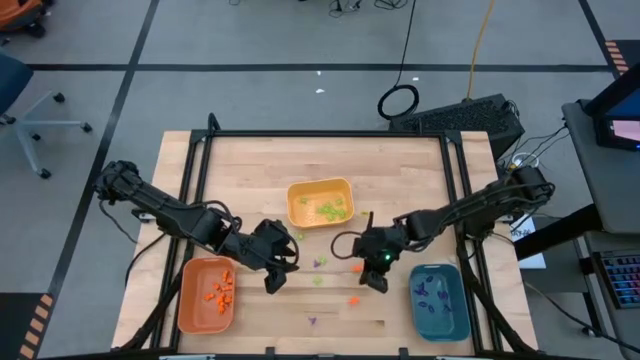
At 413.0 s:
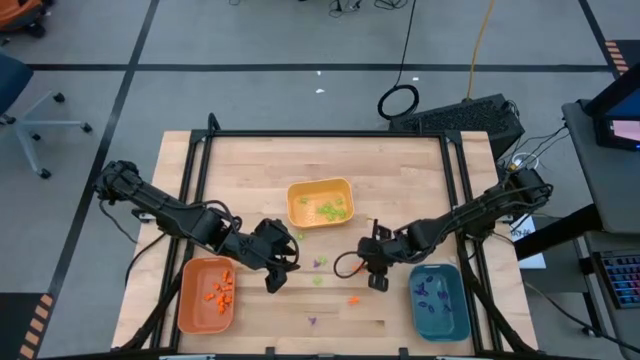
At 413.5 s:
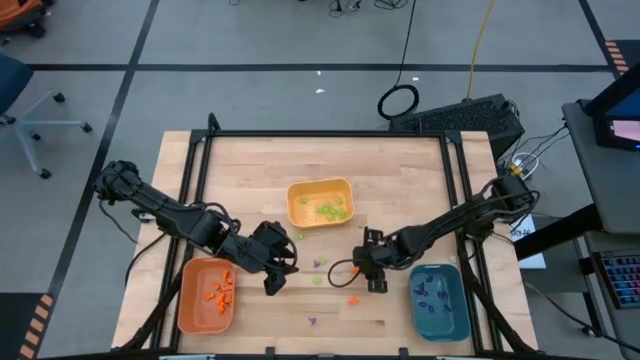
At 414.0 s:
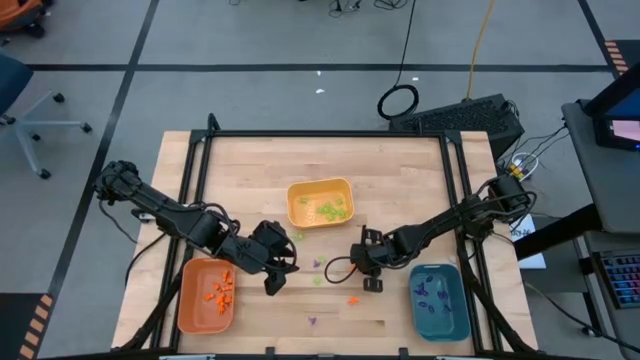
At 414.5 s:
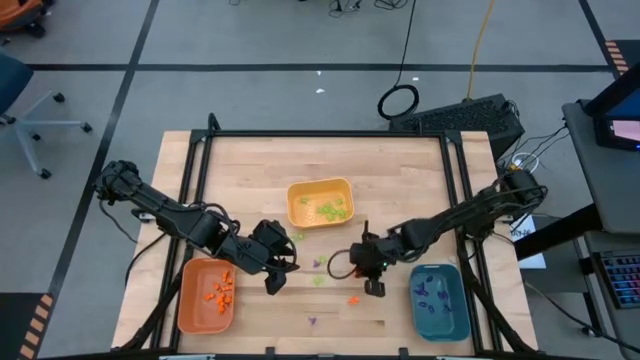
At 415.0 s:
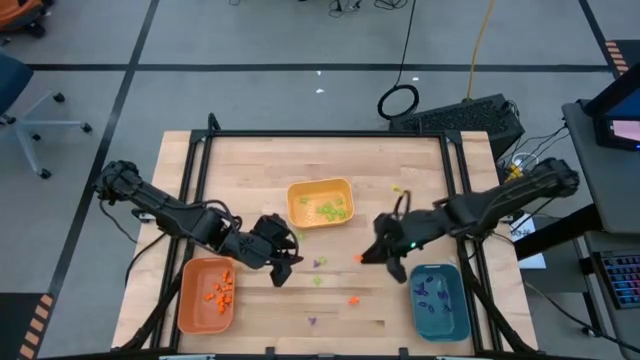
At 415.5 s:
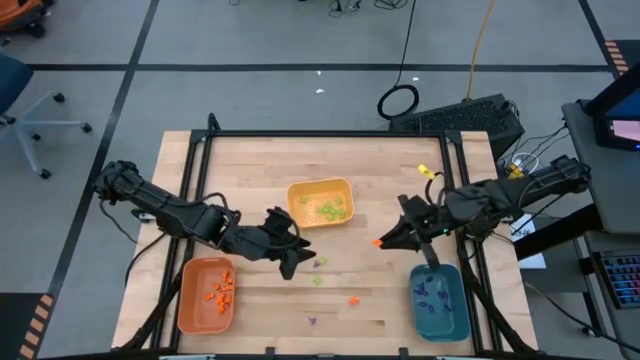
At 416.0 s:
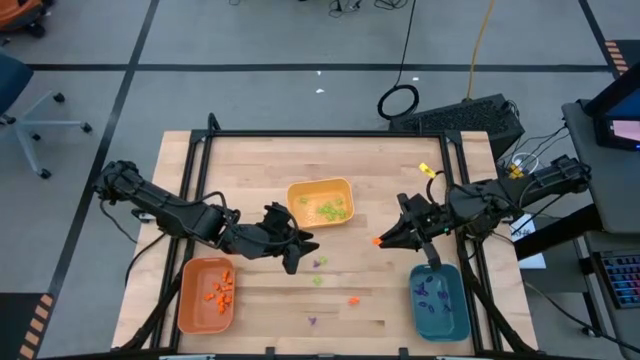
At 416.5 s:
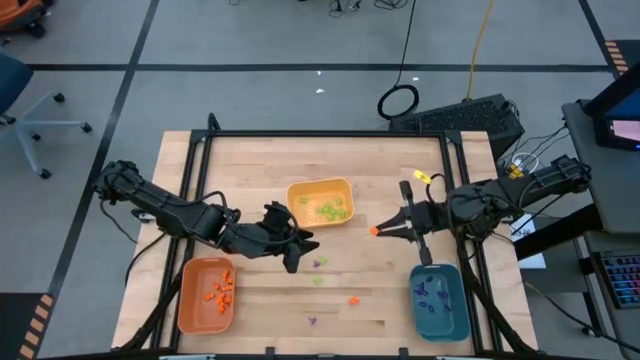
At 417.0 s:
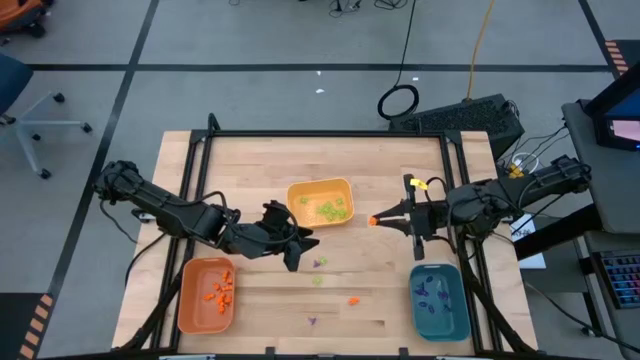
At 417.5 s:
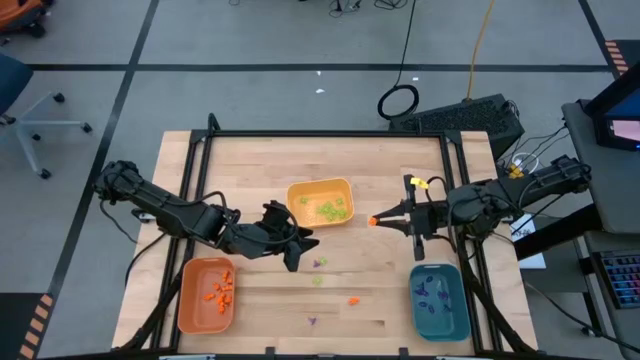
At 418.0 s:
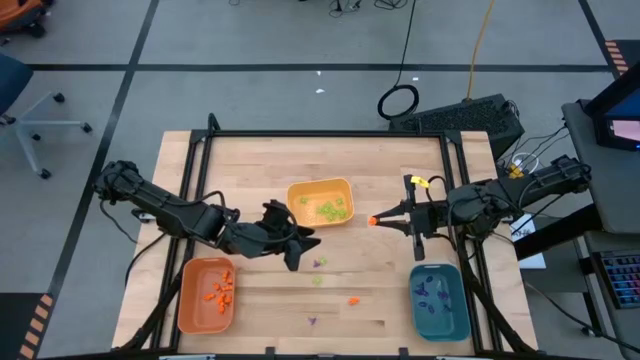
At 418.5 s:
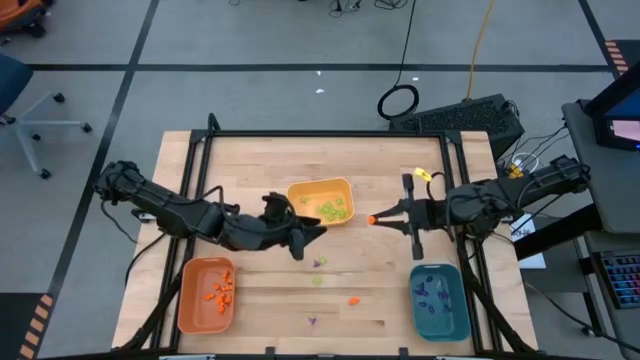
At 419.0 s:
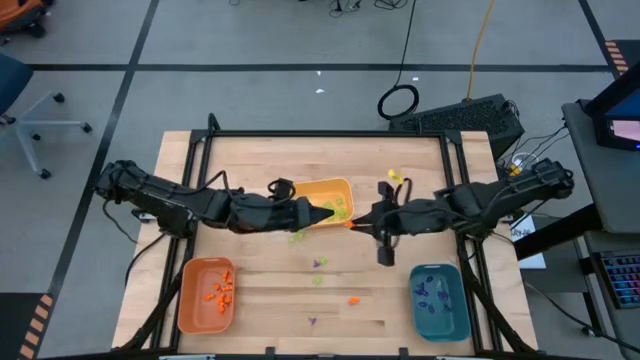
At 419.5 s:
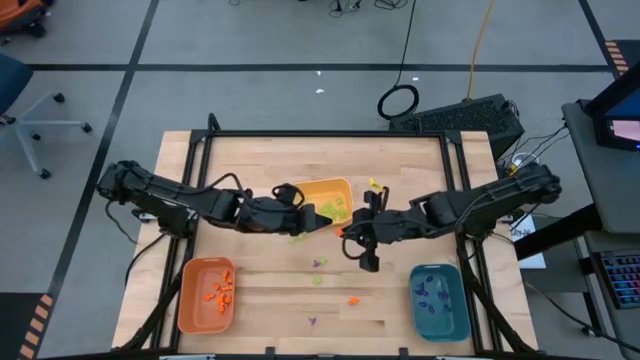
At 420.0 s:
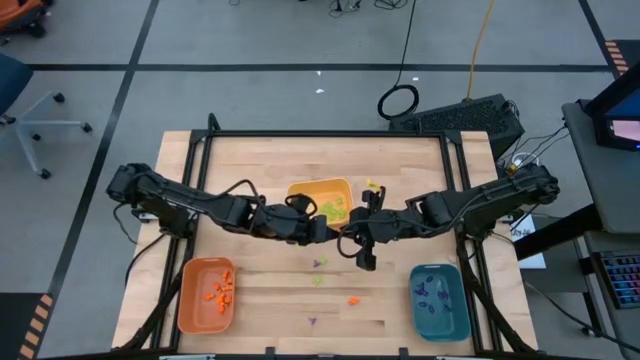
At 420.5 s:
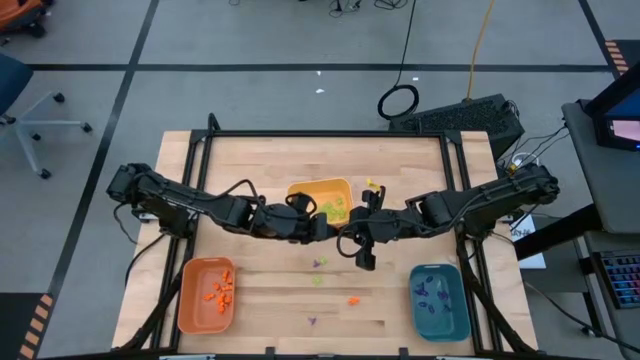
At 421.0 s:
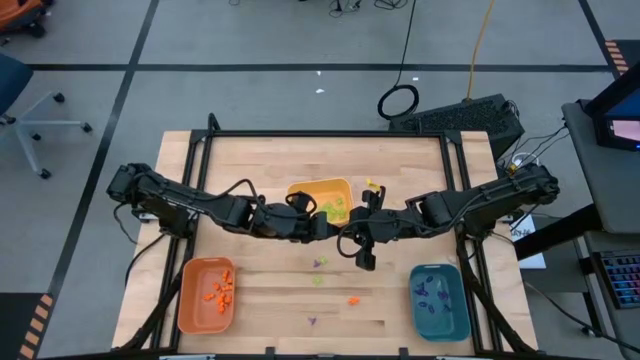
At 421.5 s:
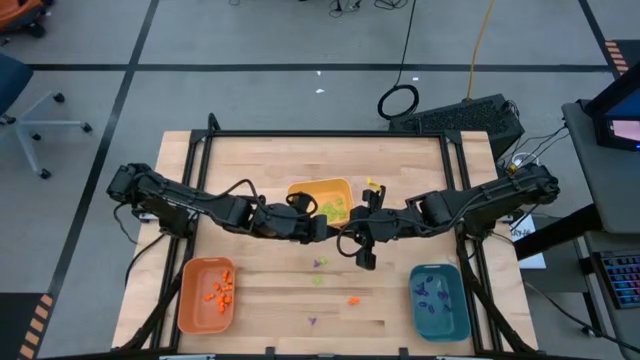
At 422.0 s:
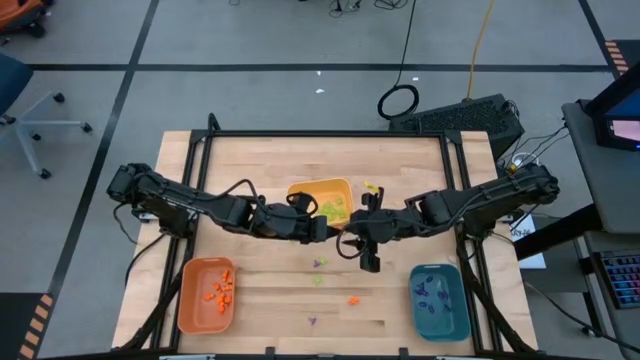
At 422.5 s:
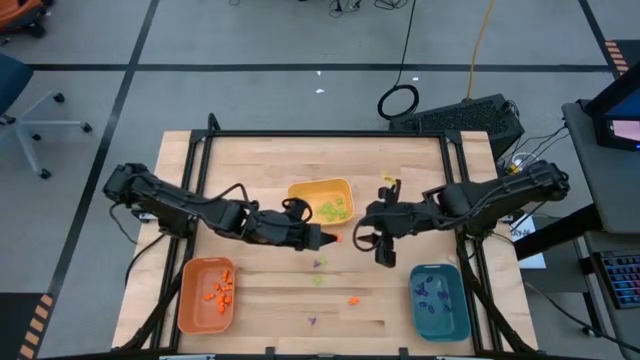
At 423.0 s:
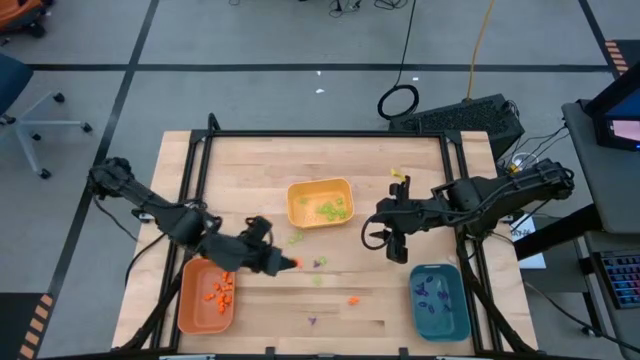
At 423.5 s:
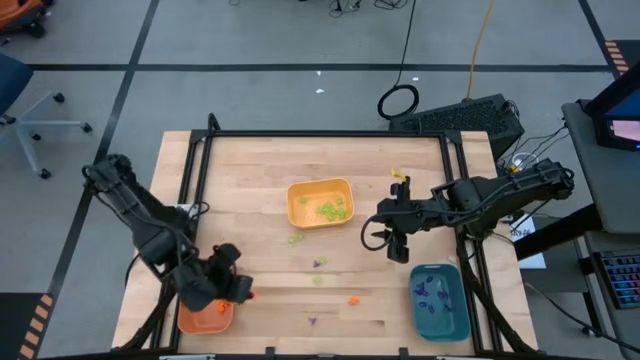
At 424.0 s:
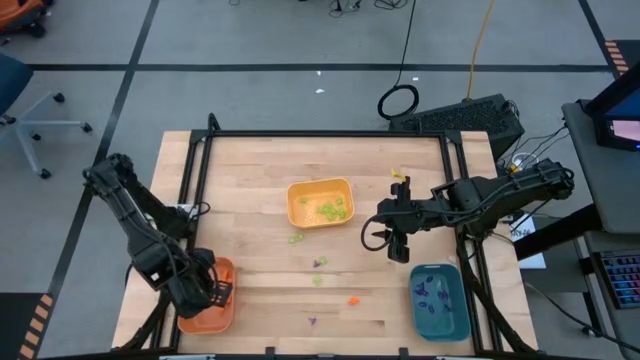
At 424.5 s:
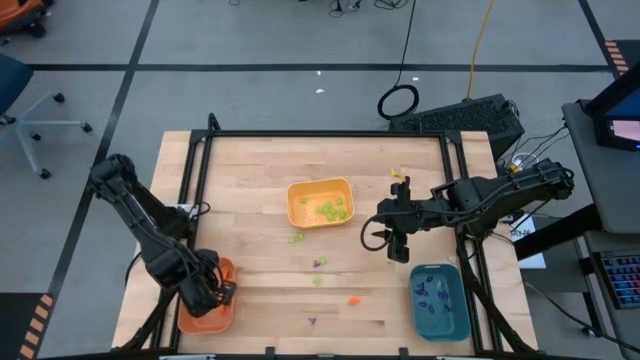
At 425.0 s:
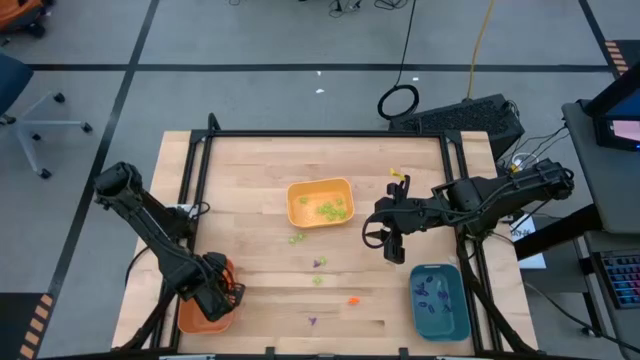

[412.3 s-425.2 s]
Task: Sort Halloween decoration
Put the orange skeleton toy into the orange bin

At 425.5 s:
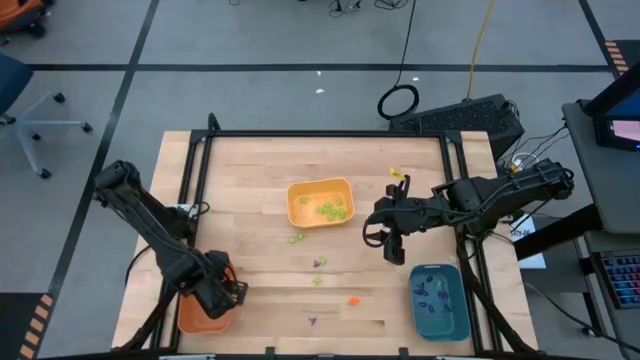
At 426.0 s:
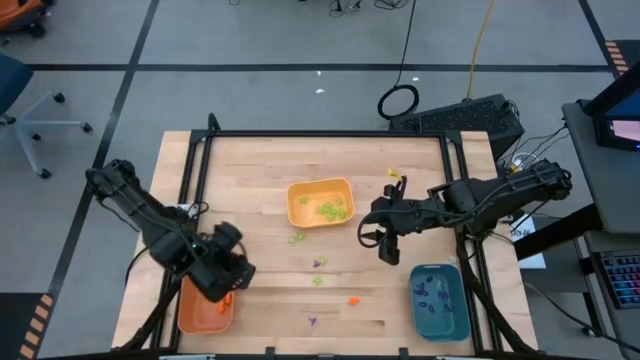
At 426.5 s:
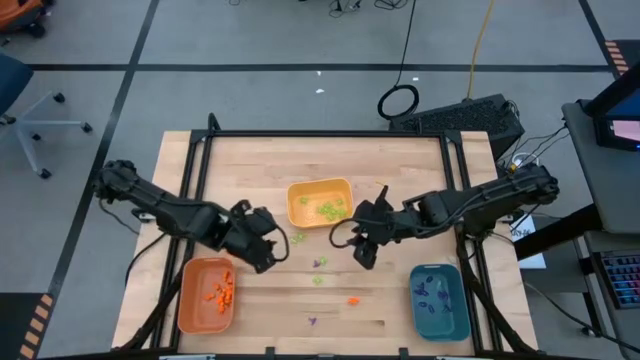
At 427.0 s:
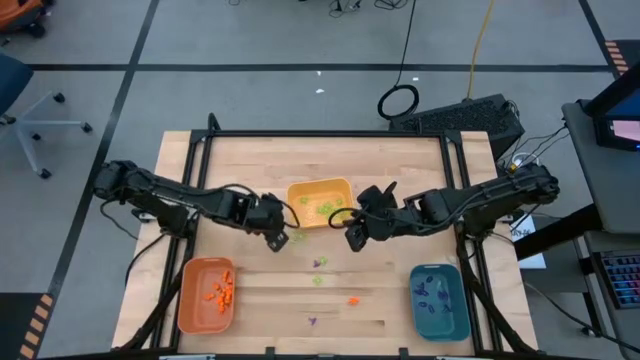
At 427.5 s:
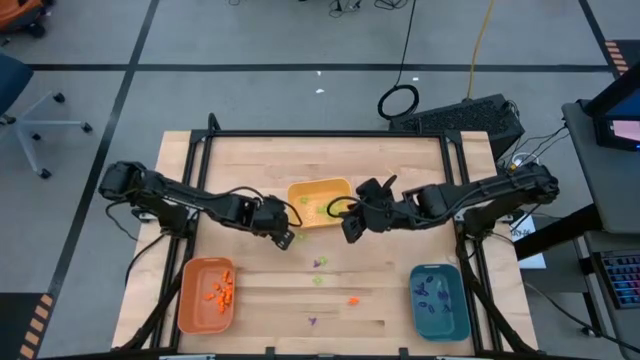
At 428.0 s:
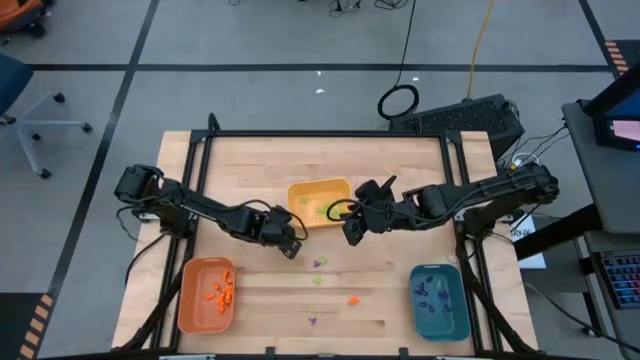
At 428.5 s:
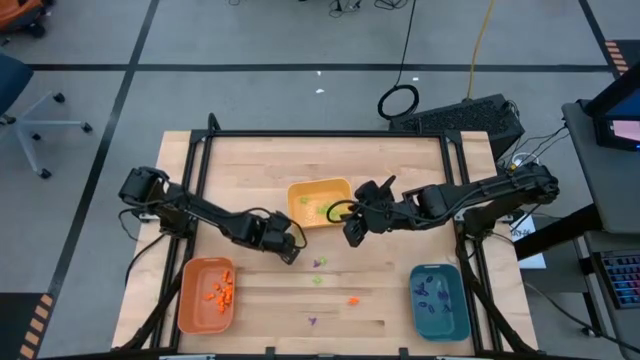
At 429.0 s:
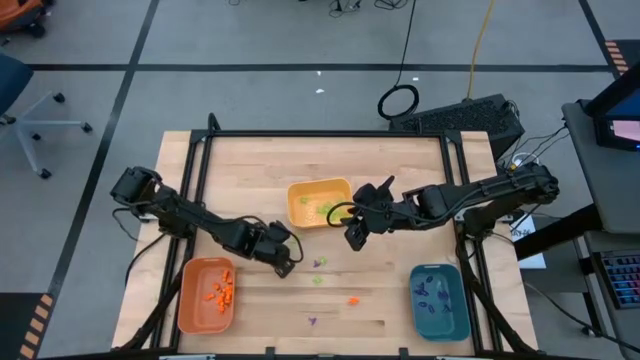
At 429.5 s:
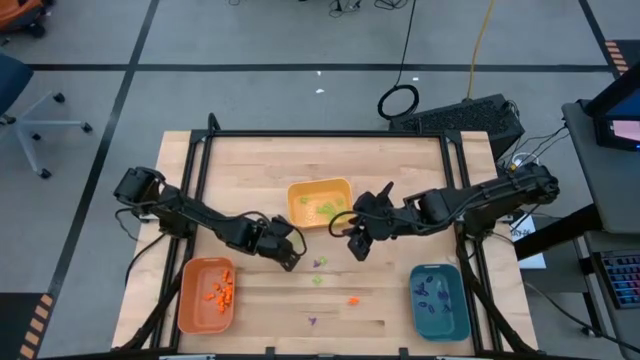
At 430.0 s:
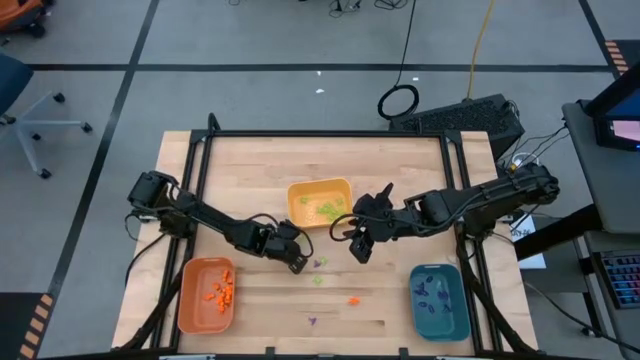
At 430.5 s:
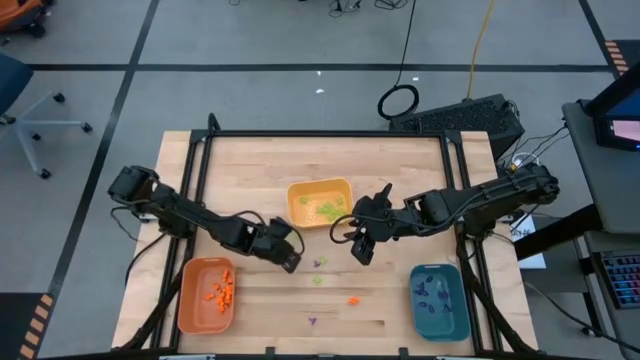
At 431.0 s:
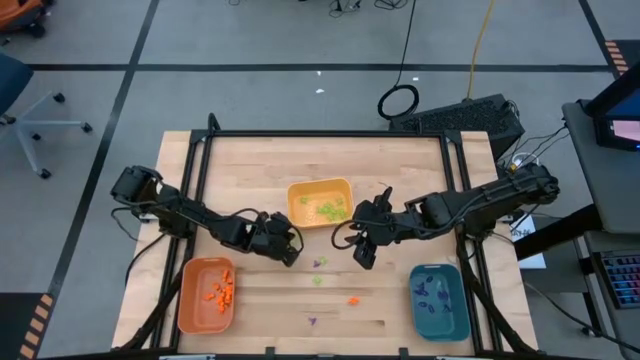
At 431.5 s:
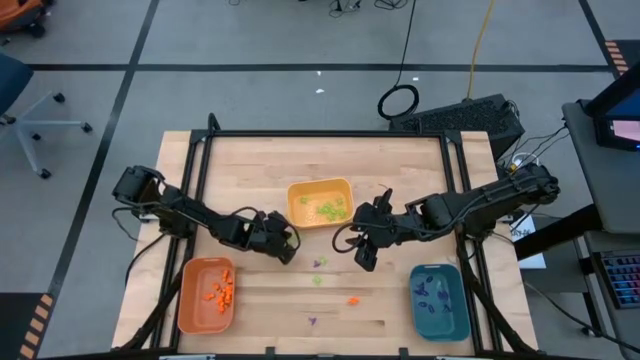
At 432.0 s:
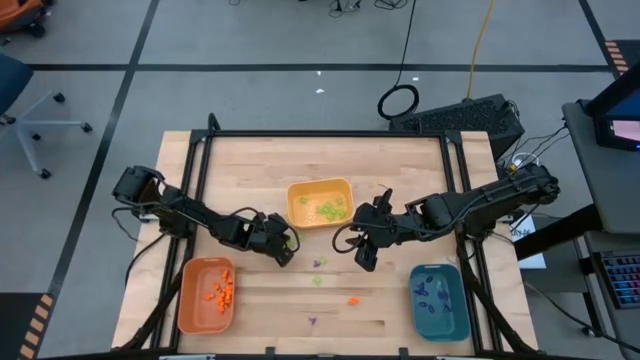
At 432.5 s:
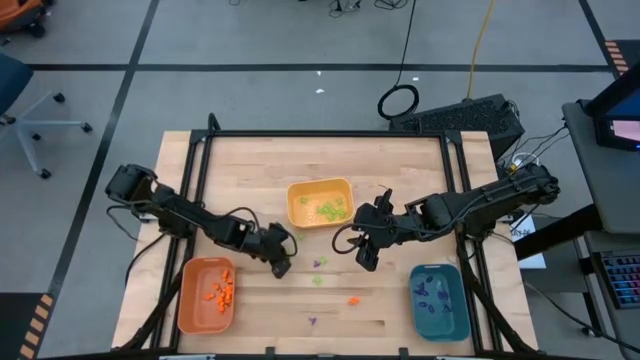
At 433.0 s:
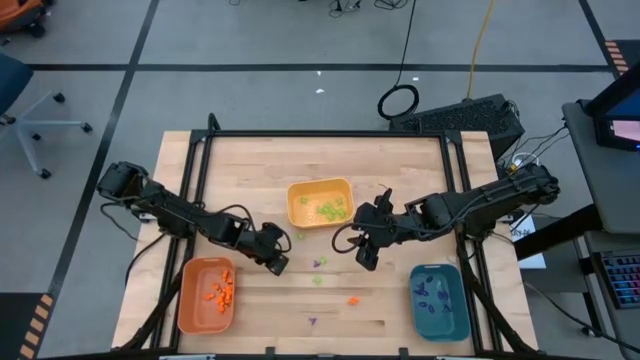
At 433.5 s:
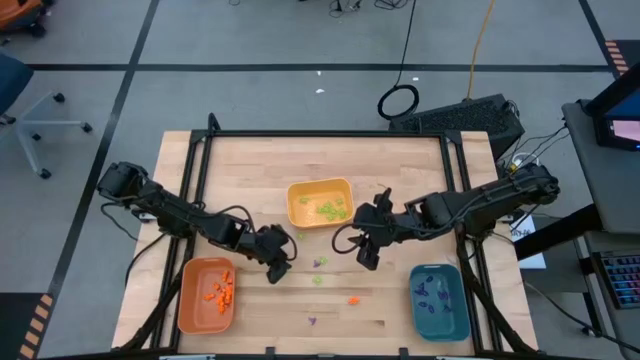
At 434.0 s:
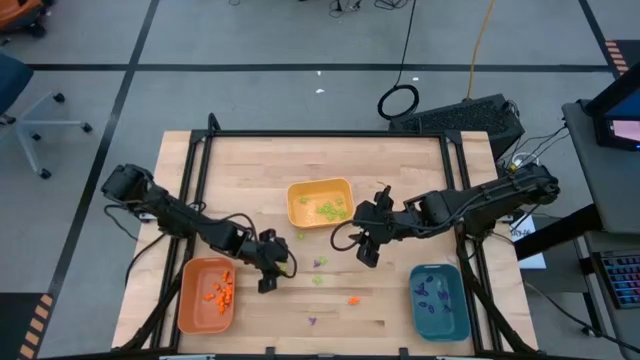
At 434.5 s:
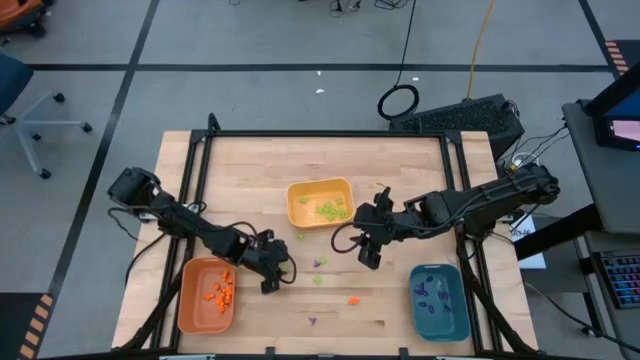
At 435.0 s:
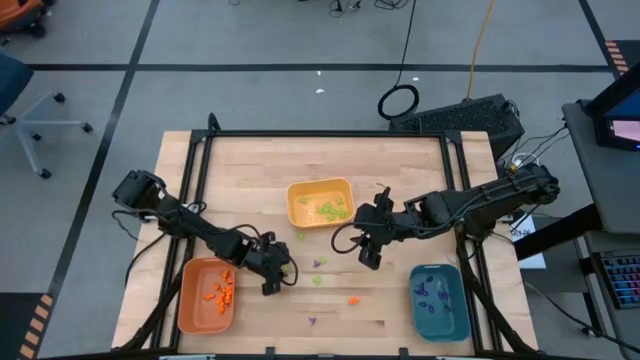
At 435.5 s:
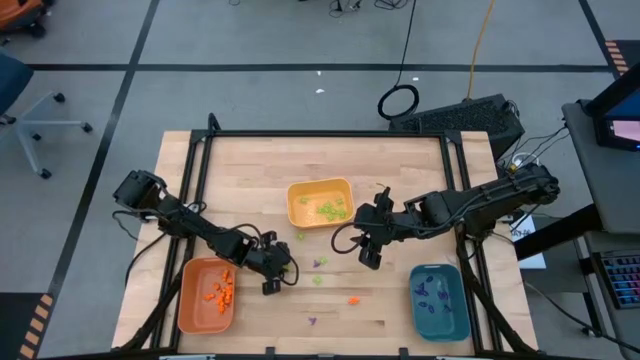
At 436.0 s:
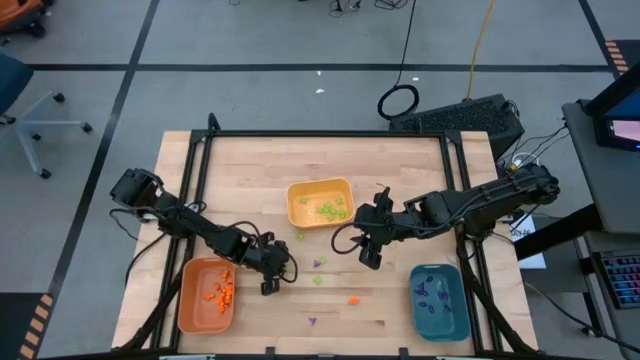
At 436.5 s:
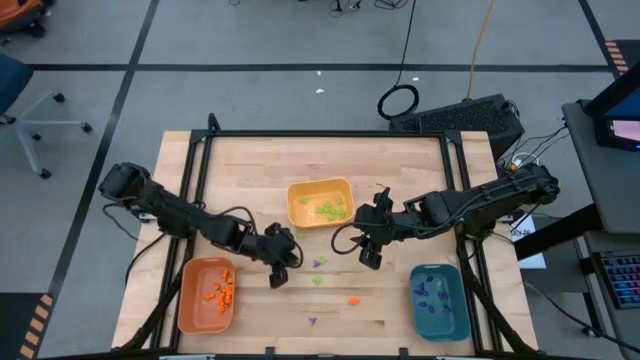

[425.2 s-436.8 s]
Put the green spider toy into the yellow bin
